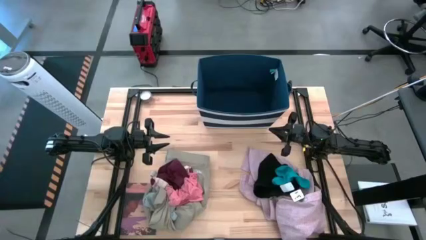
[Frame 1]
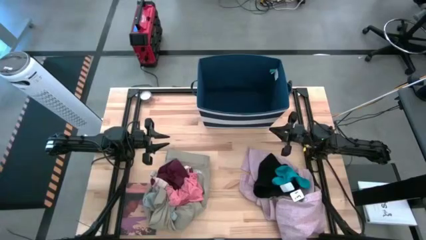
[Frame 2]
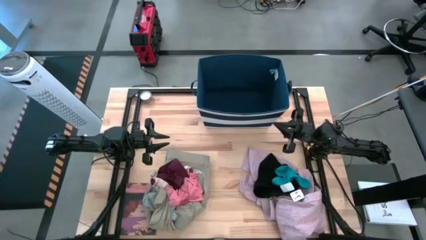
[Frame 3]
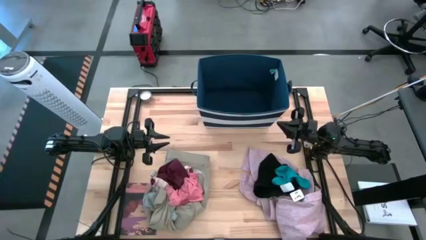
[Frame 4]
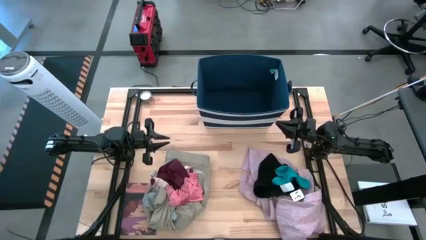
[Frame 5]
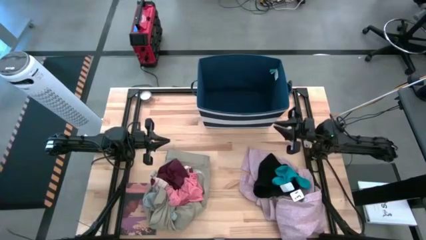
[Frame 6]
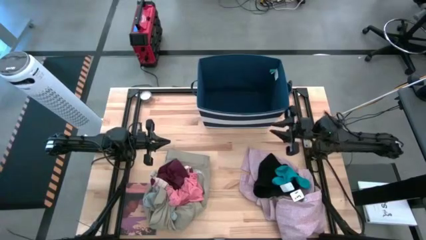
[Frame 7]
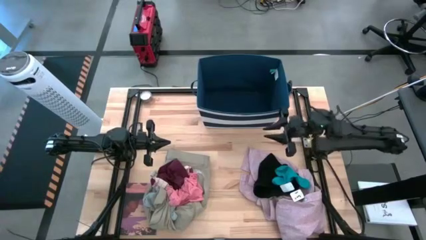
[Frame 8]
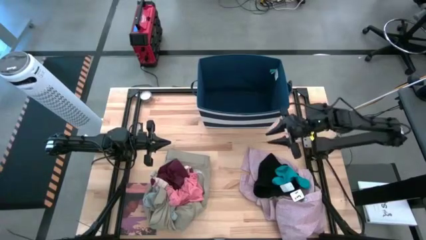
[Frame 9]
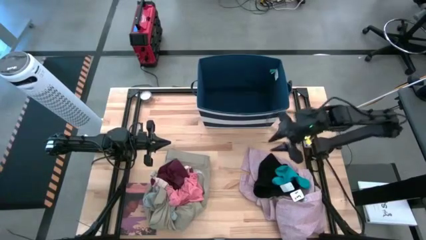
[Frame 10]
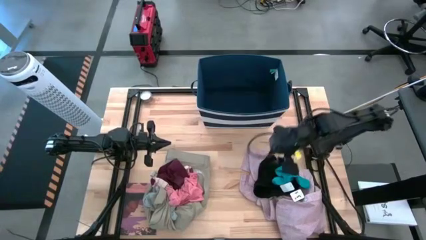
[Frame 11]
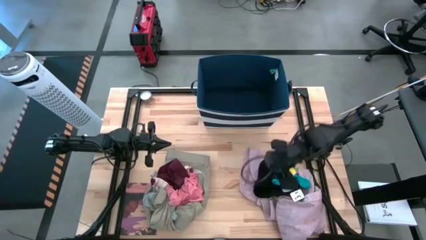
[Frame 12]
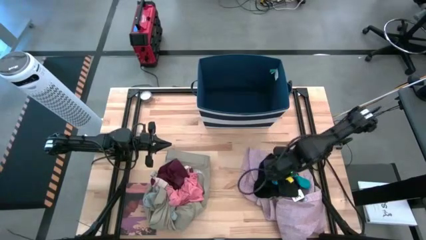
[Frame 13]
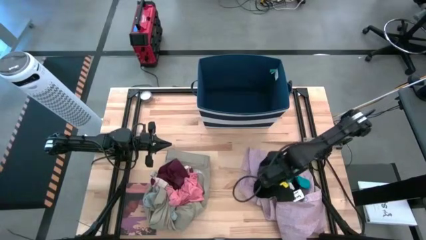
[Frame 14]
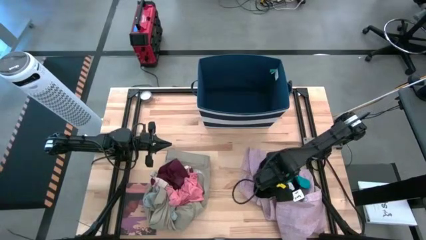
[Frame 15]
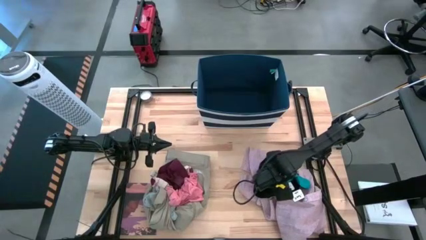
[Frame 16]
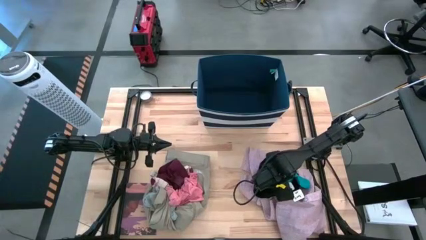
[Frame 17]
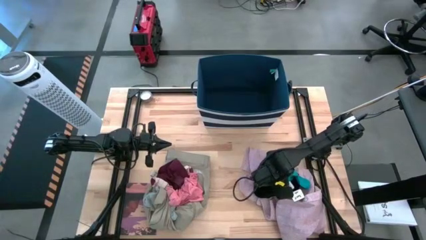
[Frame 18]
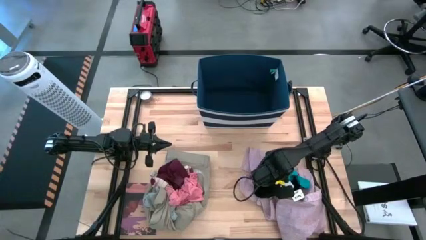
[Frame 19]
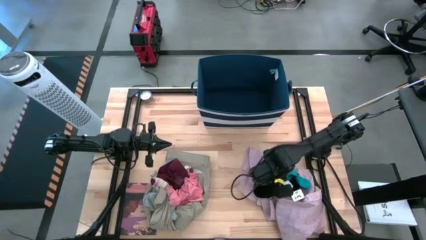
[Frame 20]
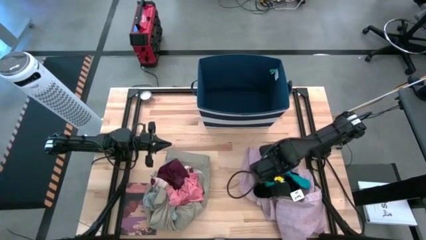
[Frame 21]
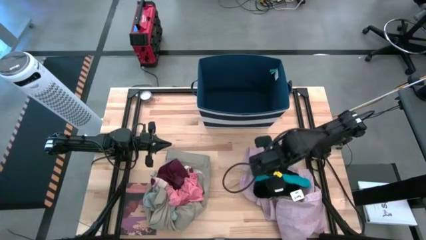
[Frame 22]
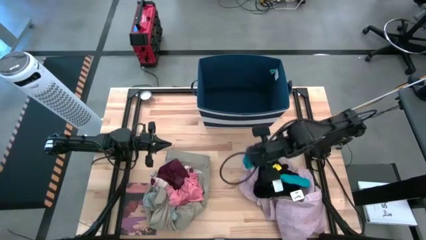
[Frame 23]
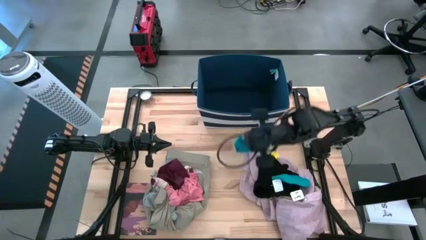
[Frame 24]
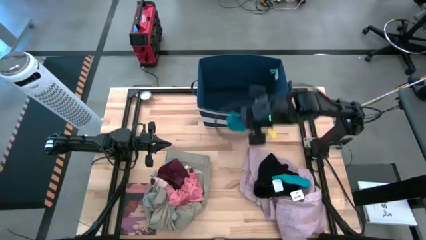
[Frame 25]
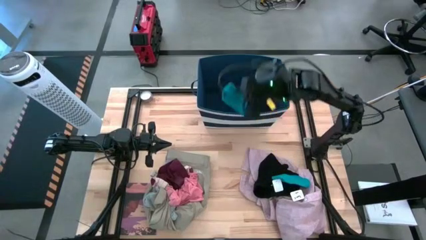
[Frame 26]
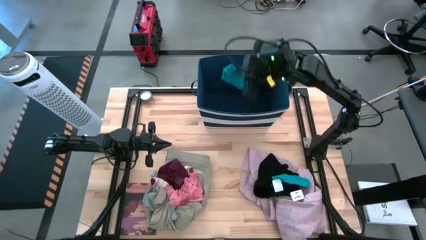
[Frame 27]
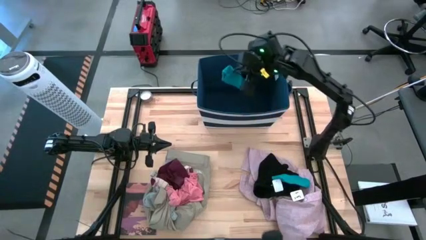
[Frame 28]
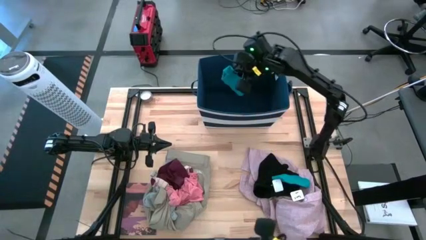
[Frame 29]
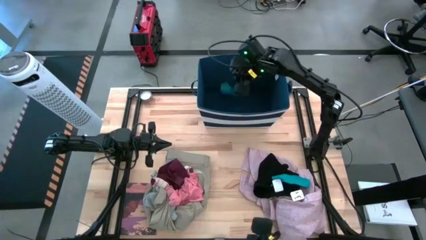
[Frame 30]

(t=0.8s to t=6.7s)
Task: Sort clothes
Put the left blue sock into the laundry bin

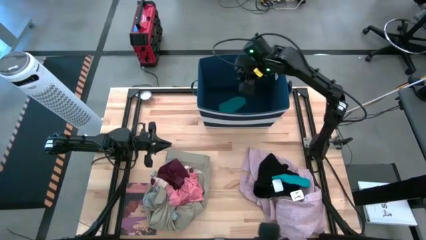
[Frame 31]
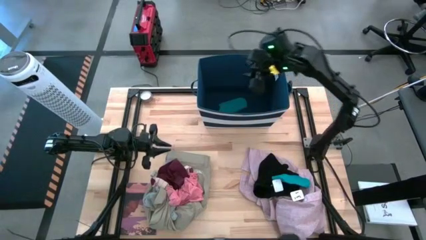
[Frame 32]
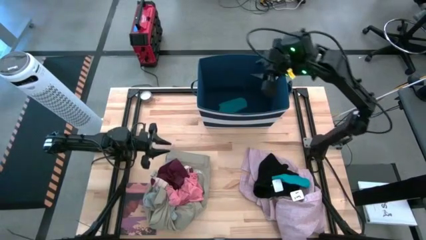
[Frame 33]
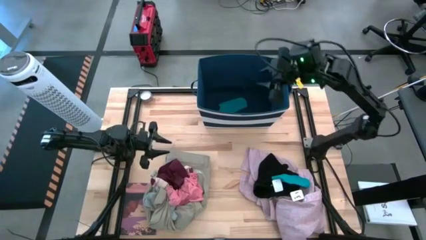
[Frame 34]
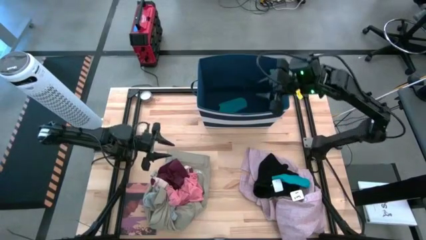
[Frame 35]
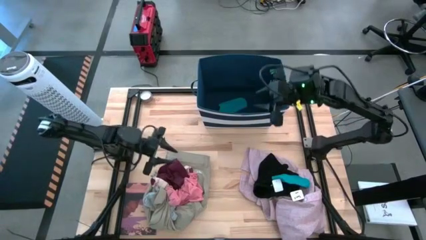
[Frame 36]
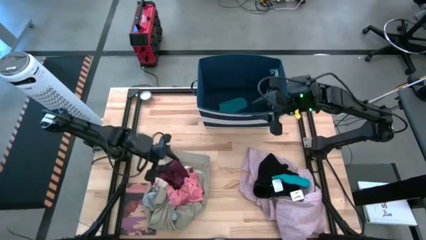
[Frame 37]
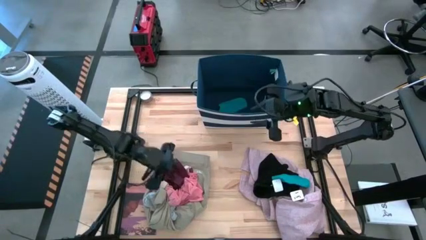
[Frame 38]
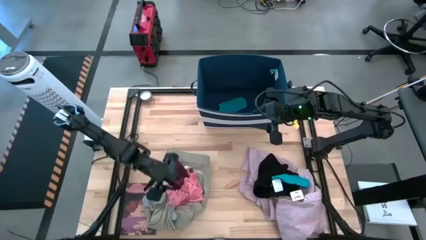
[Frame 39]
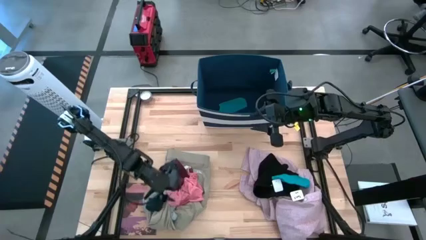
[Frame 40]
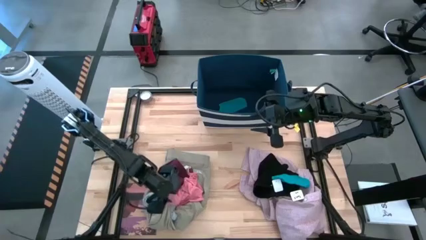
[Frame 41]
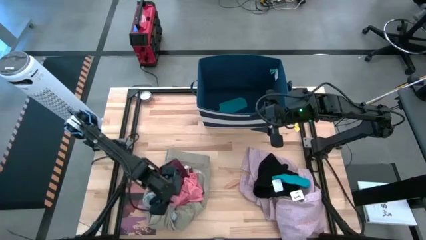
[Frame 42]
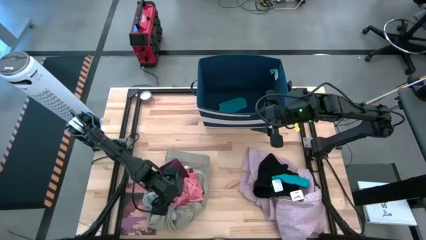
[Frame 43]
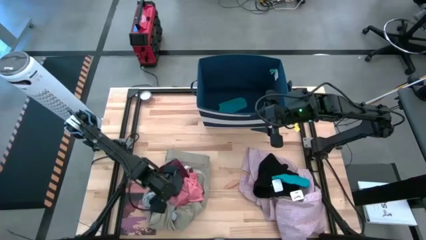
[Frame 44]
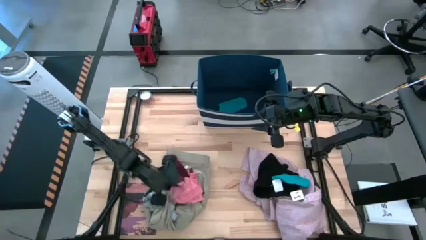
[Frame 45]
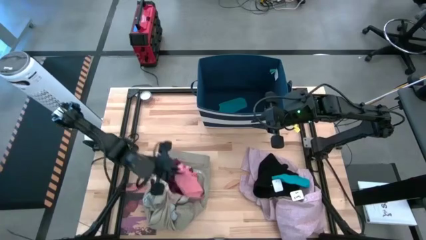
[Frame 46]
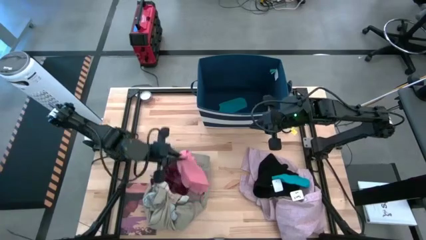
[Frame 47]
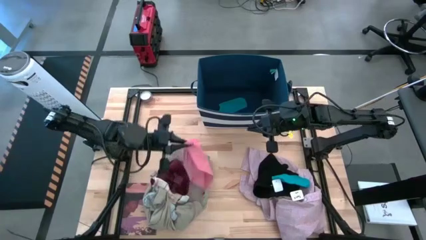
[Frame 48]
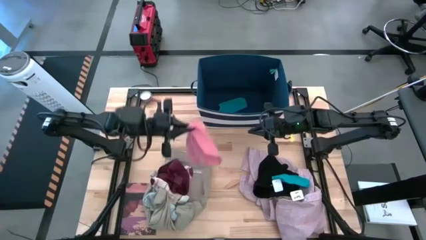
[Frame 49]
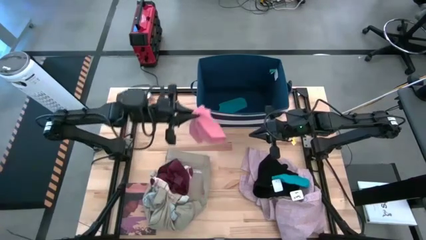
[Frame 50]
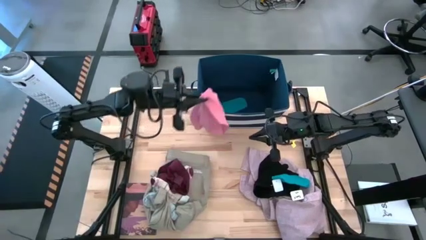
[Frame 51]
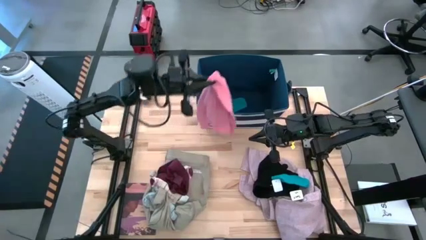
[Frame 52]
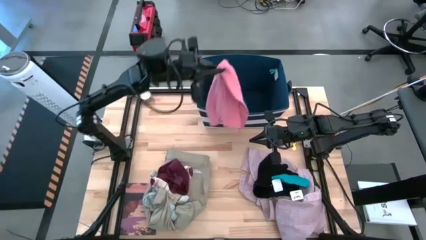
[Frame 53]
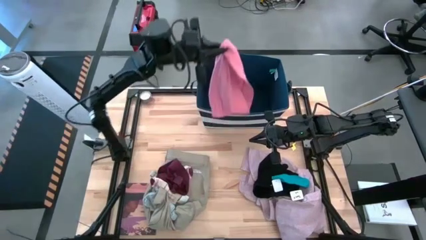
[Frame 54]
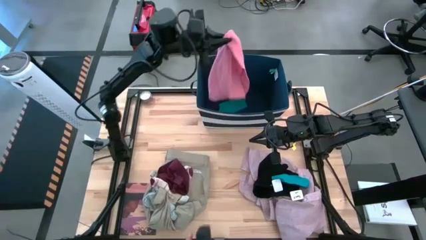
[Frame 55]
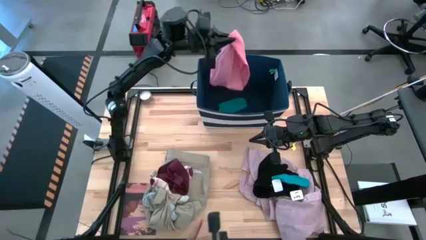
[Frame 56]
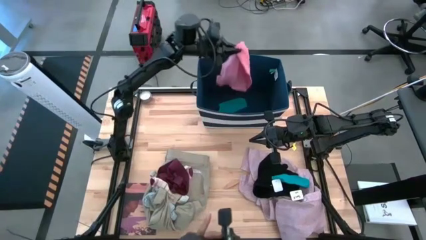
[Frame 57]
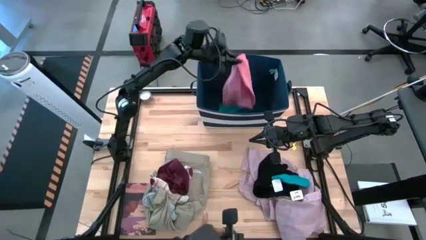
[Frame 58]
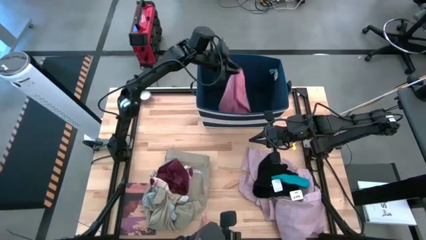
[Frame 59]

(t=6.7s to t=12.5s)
Put the pink underwear into the laundry bin

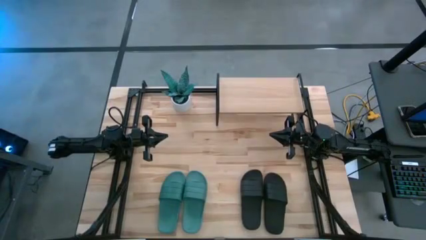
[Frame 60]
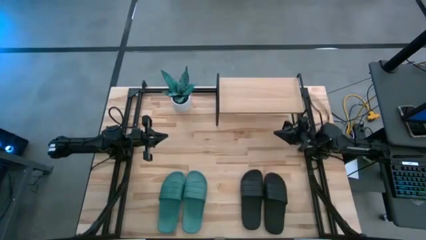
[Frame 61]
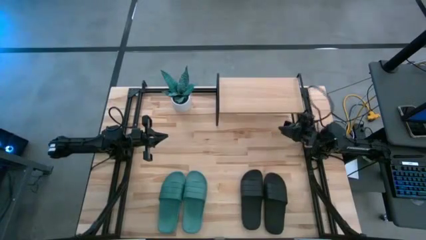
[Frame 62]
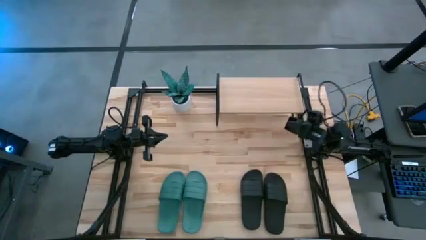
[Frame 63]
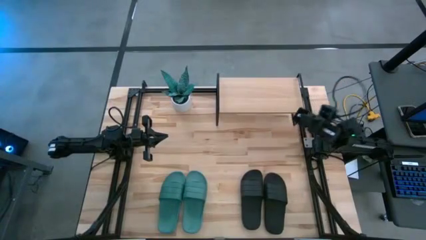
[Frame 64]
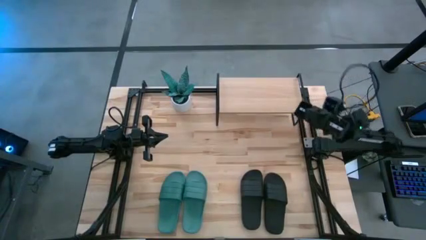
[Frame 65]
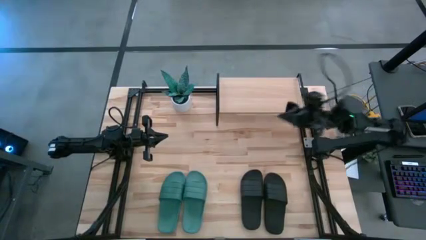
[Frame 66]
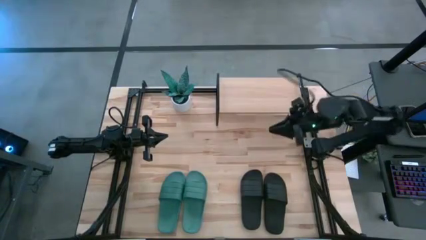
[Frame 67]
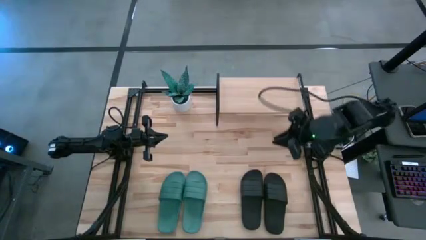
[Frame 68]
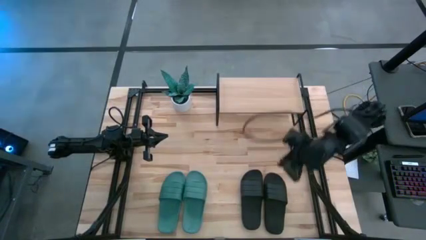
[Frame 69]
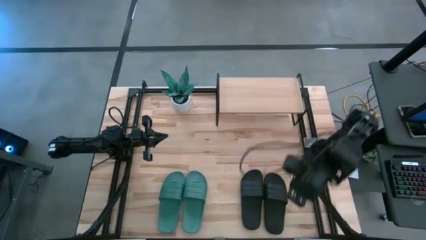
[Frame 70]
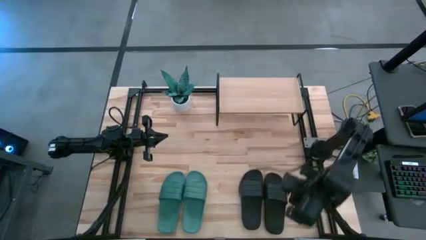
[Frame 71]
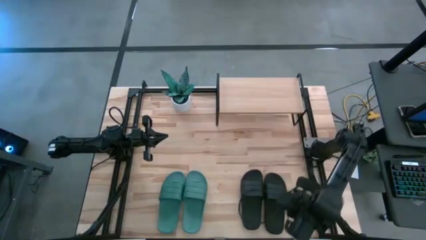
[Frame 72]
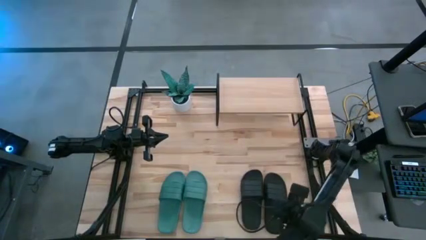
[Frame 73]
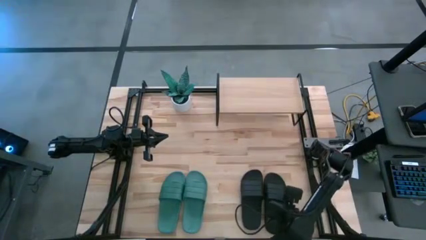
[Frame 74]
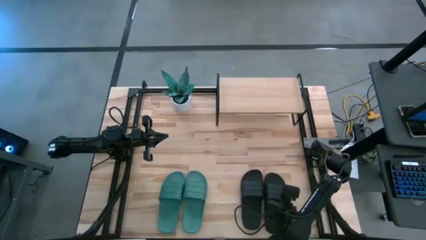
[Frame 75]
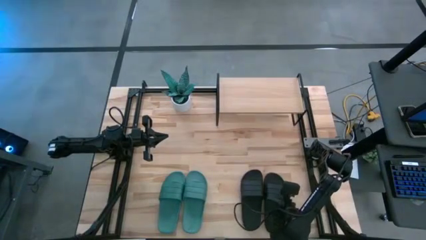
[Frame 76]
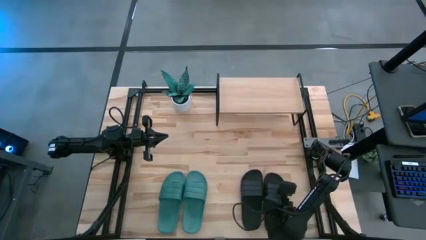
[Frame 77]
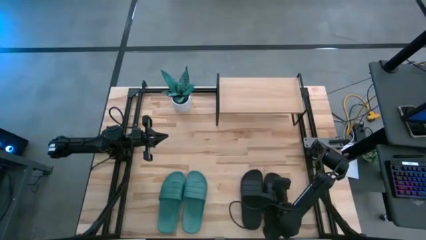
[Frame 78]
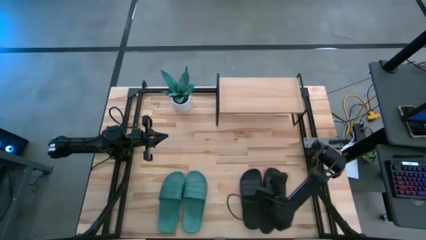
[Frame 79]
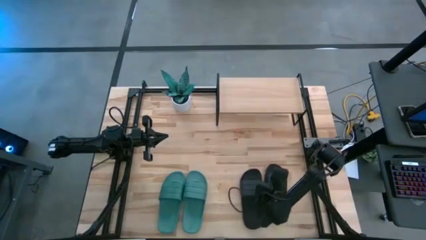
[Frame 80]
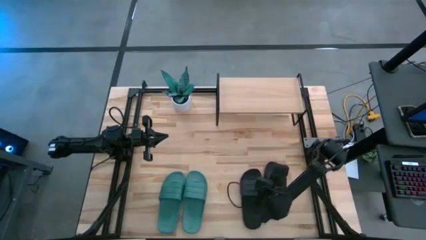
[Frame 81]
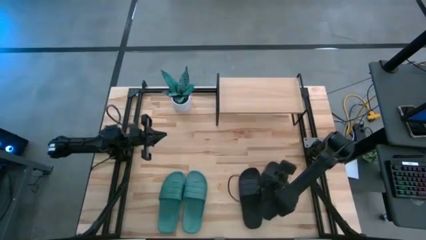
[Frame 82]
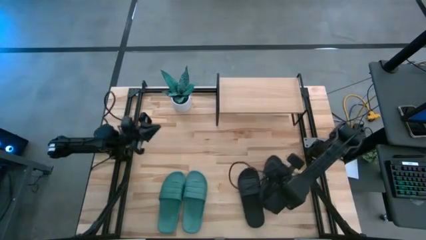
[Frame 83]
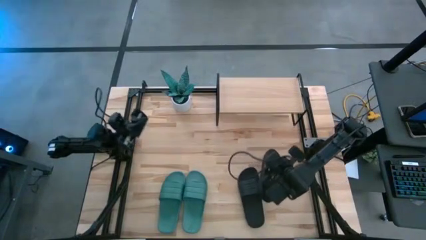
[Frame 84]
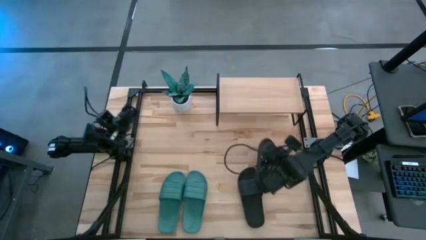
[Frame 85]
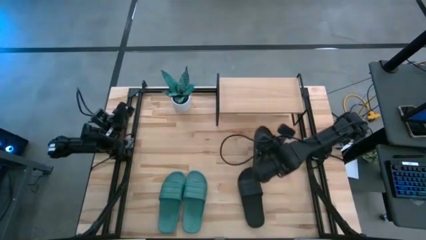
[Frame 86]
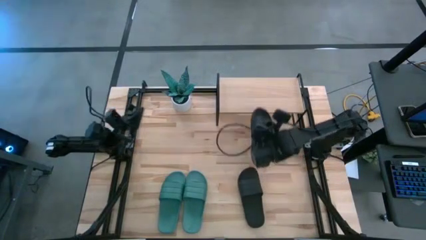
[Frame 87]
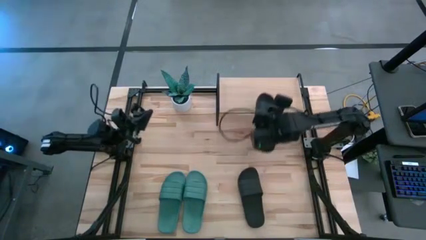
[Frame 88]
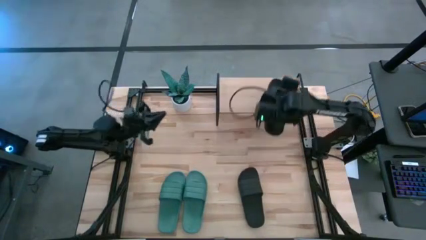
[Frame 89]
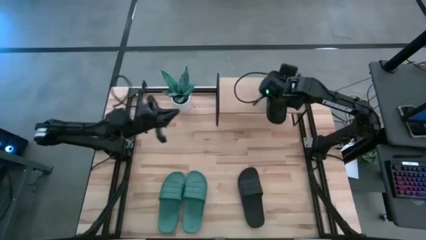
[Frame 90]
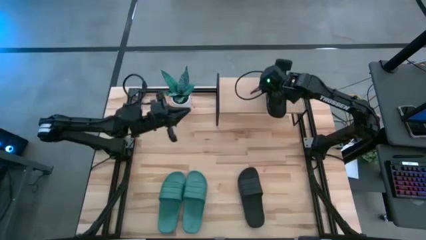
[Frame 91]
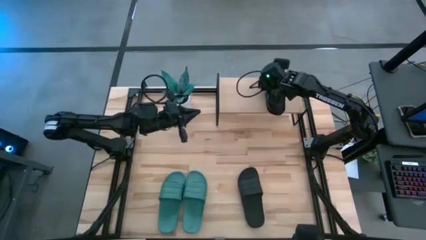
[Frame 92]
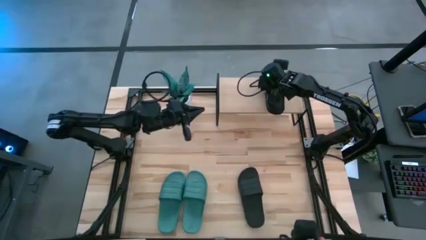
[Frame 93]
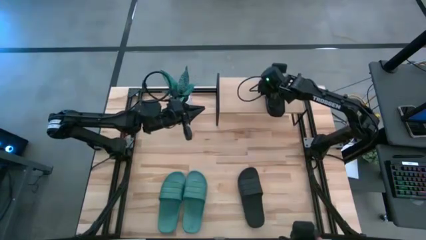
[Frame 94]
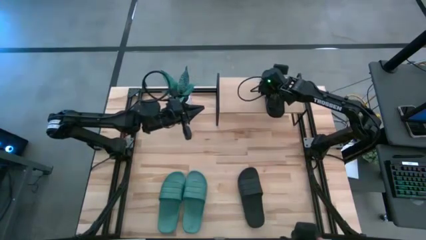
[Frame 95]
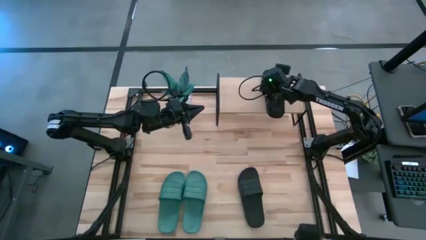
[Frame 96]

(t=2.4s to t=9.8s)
Task: Pick and place slides into the shelf
Put the right black slipper on the shelf
